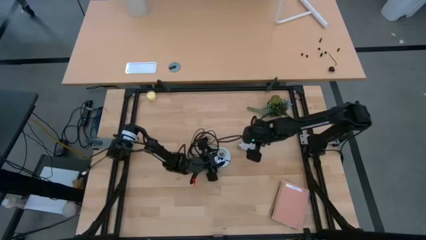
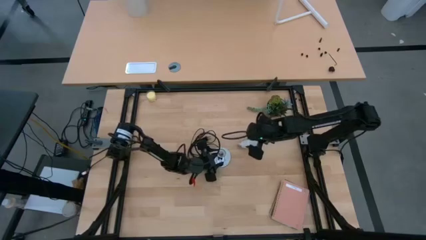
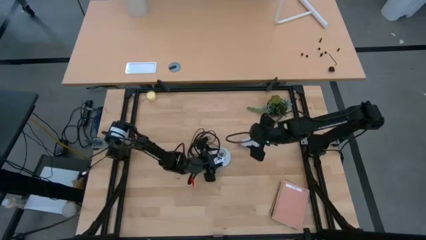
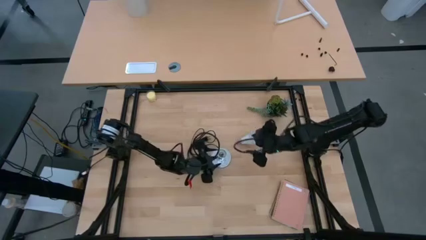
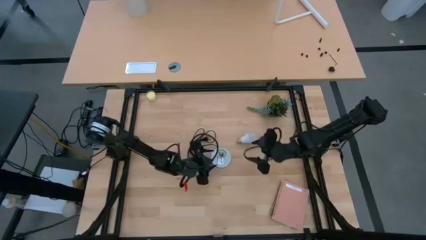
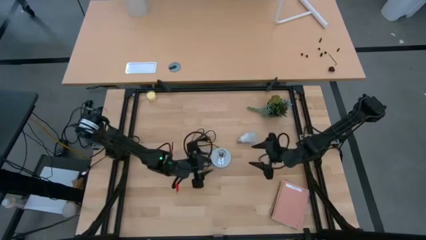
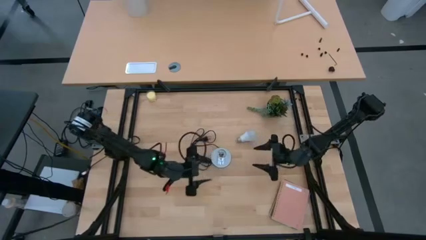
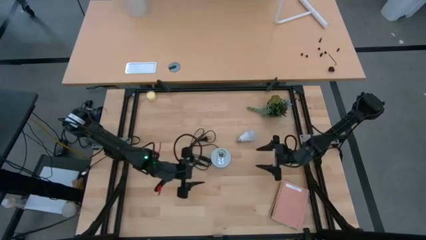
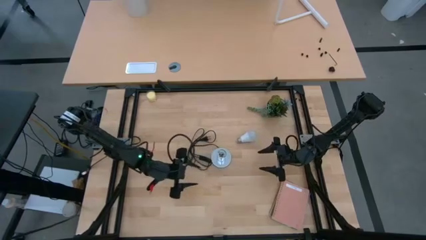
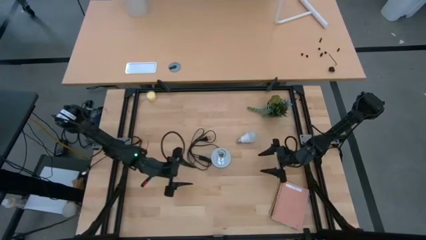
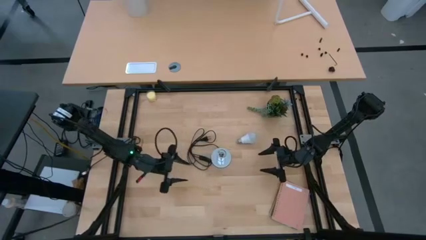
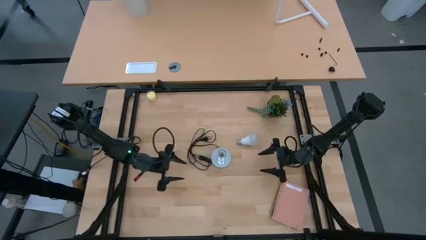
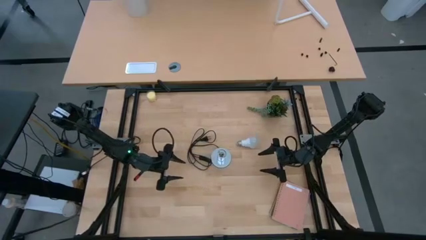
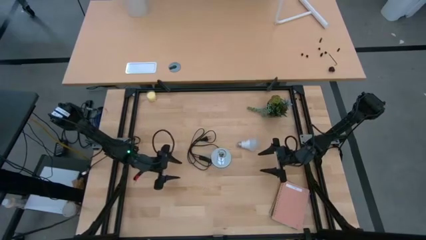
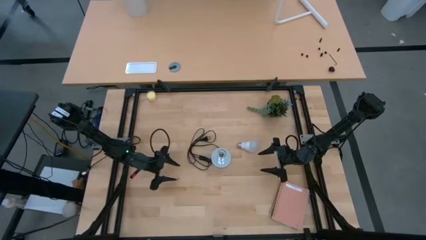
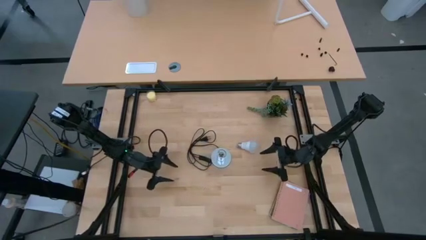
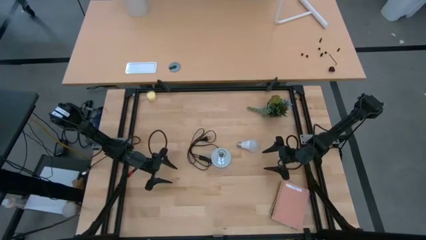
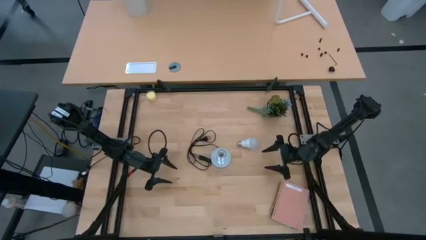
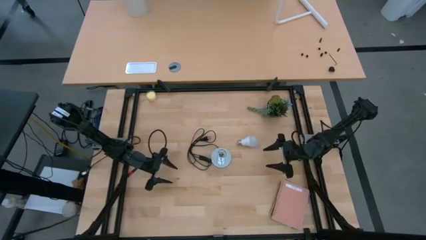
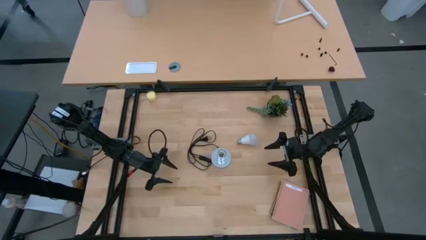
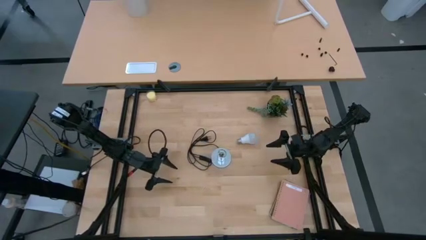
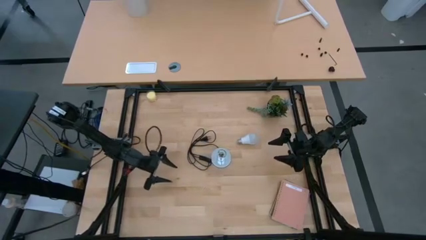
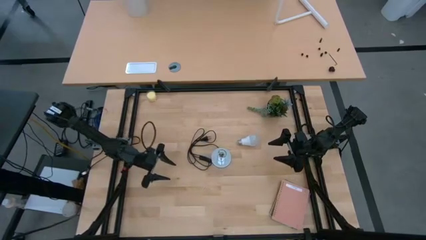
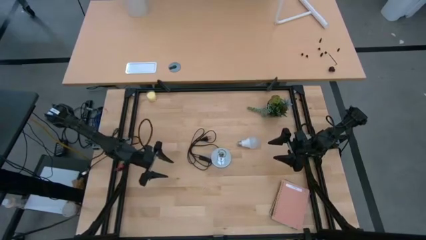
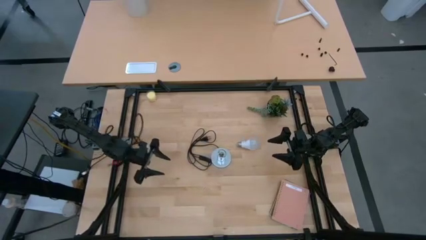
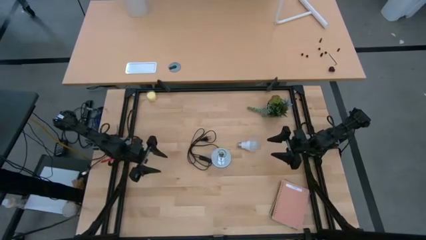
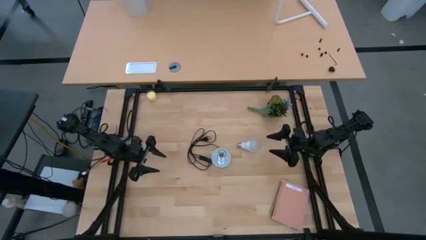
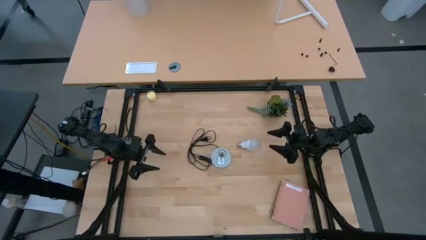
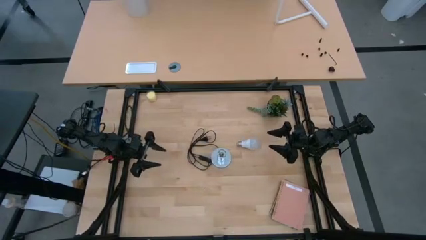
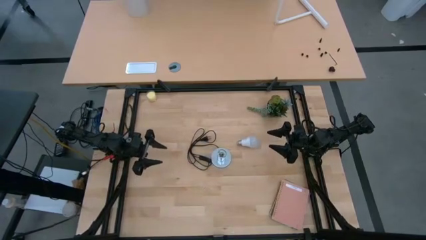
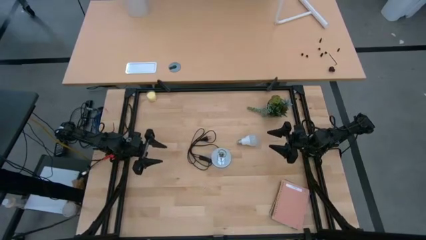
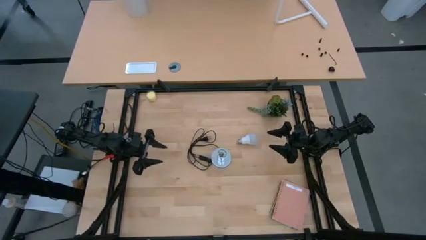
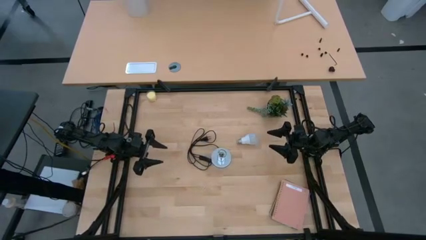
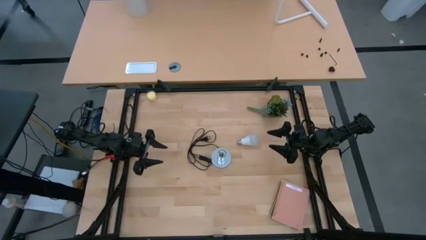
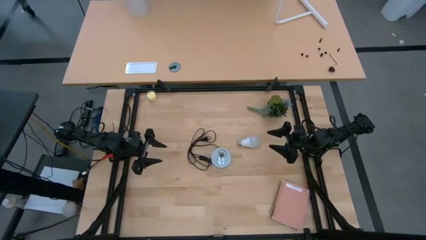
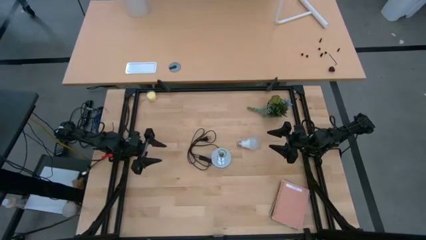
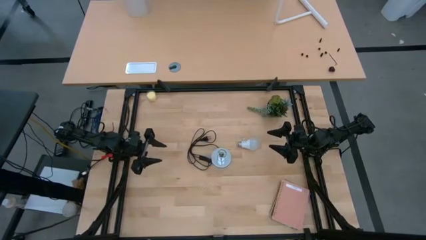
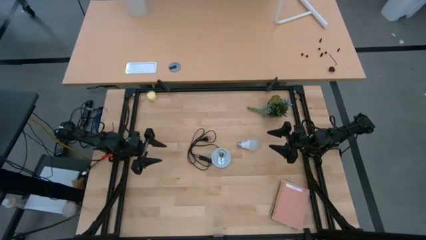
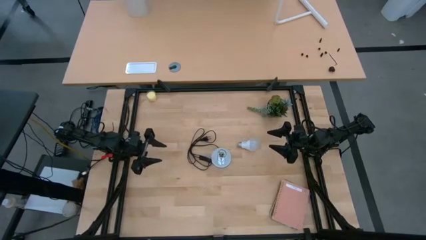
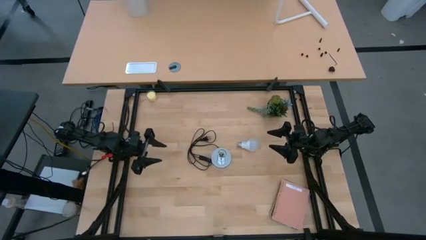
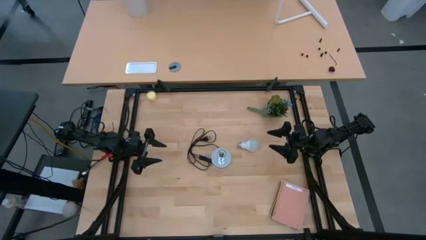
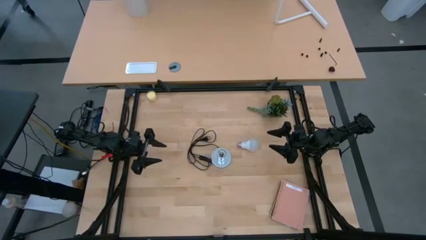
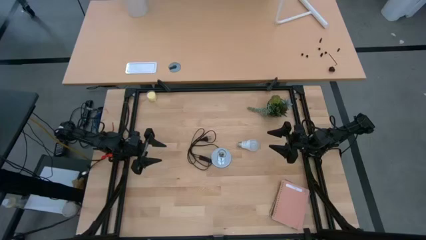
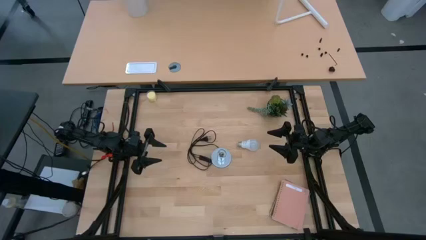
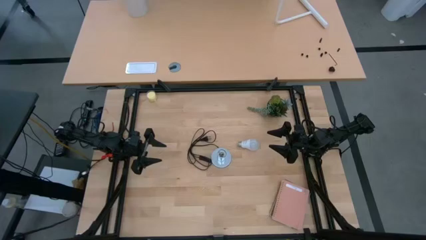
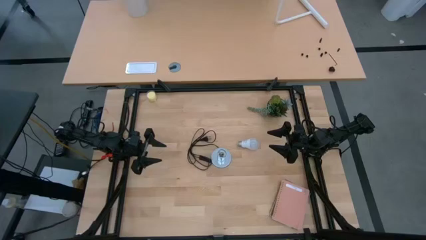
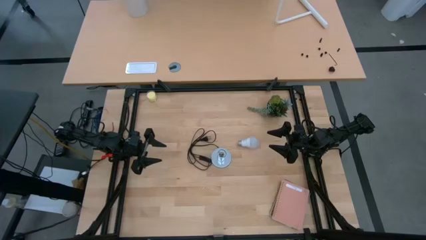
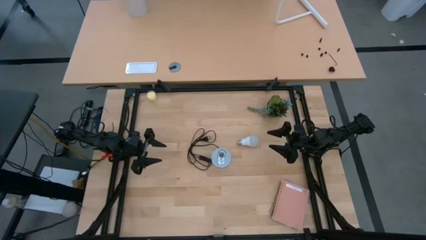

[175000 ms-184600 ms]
Task: Screw lightbulb
Return to Home Position

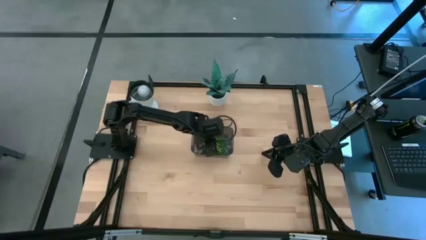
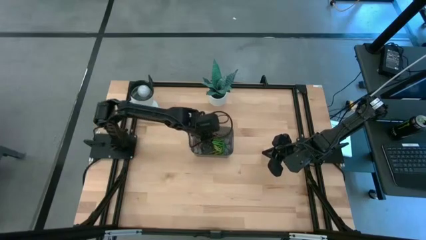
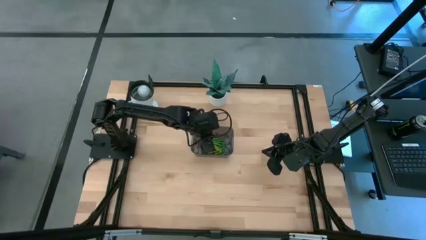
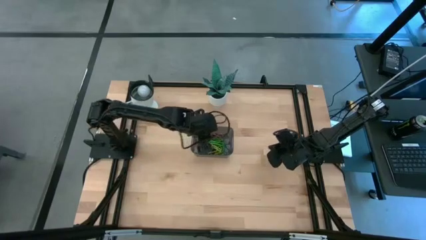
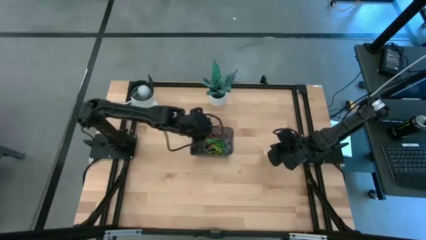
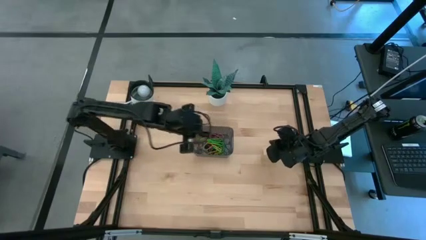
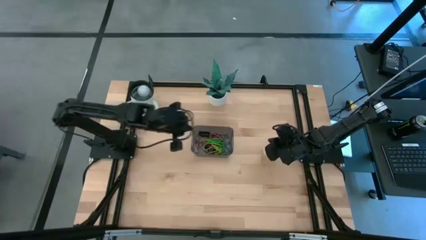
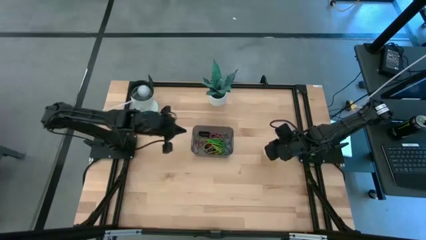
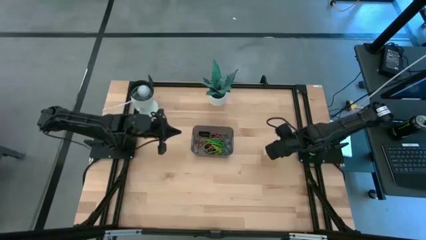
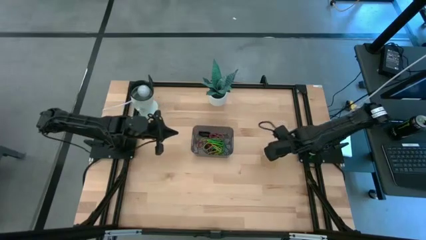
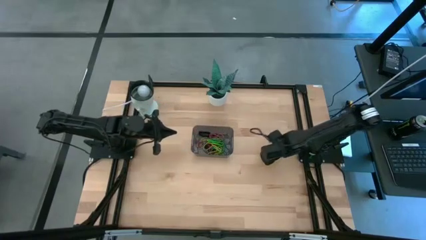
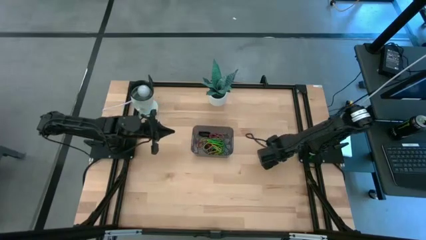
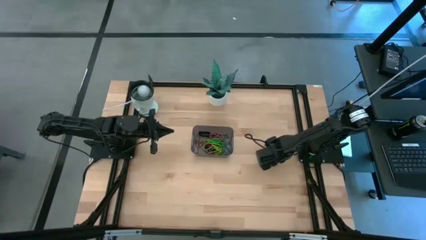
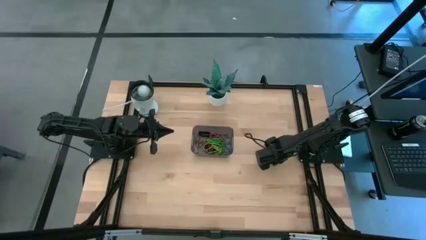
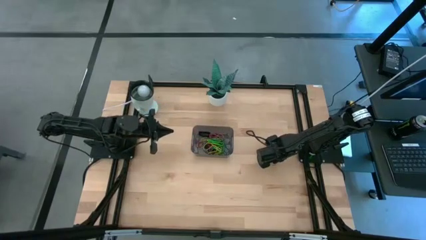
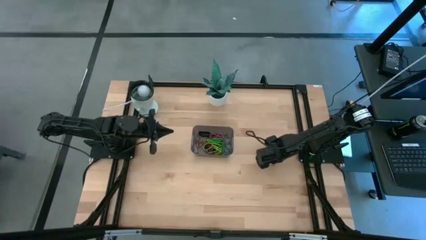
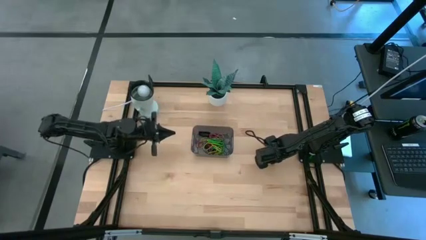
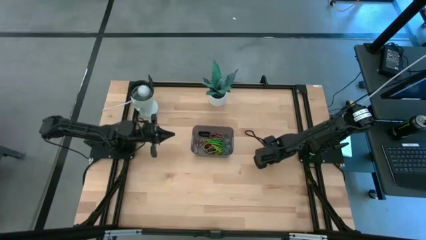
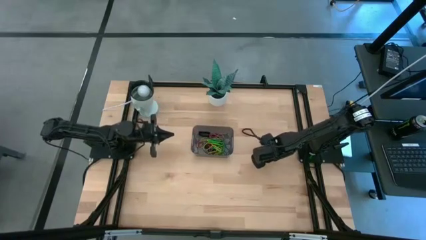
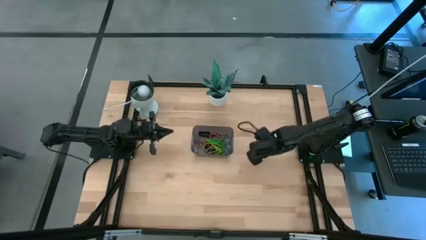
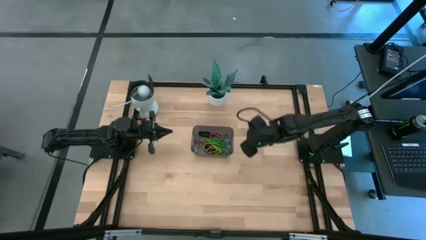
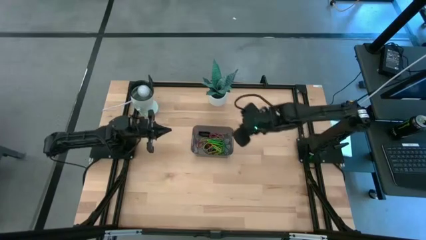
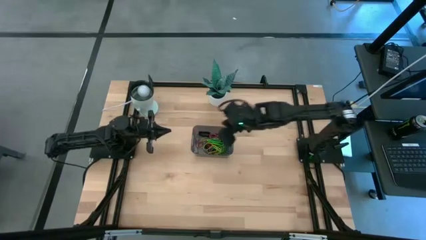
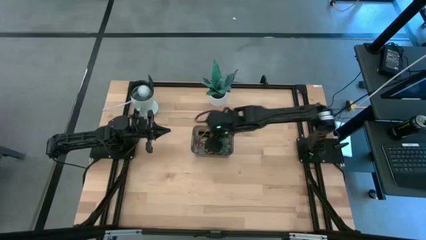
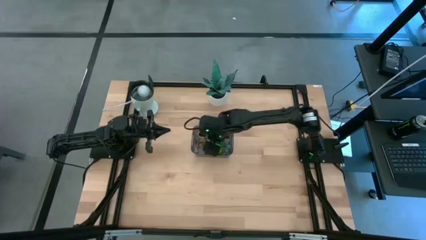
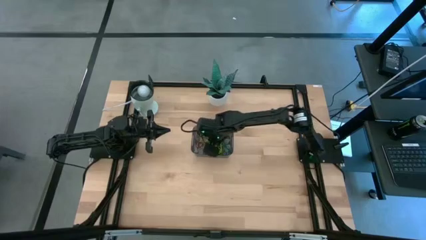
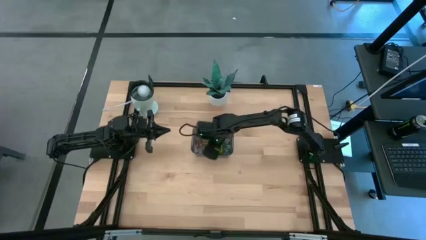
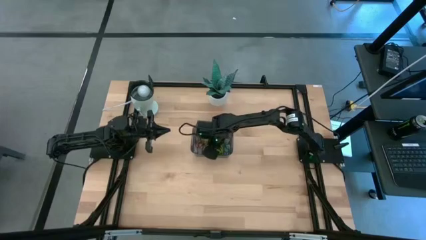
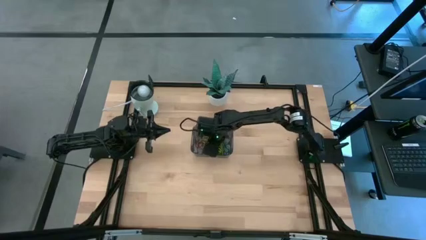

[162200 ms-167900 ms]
Task: Pick and place rubber bands into bin
Put the yellow rubber band into the black bin
